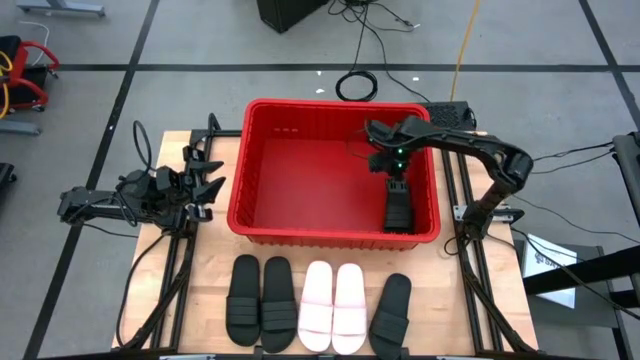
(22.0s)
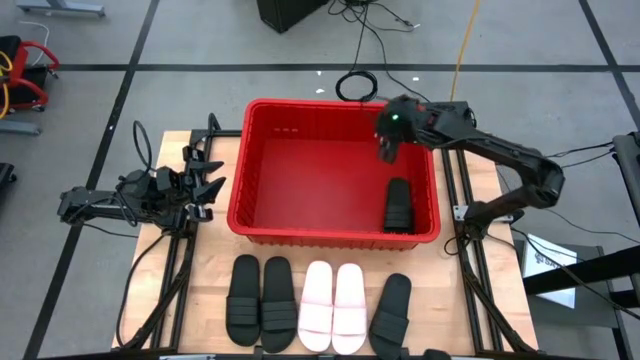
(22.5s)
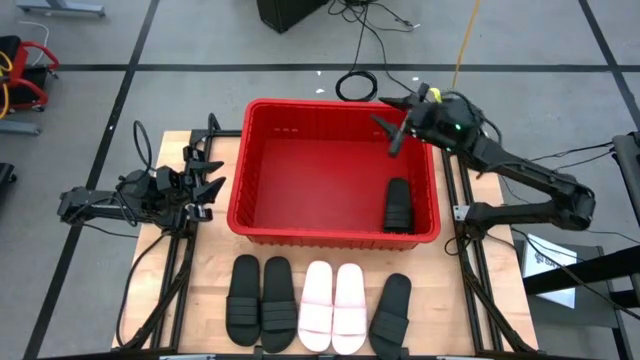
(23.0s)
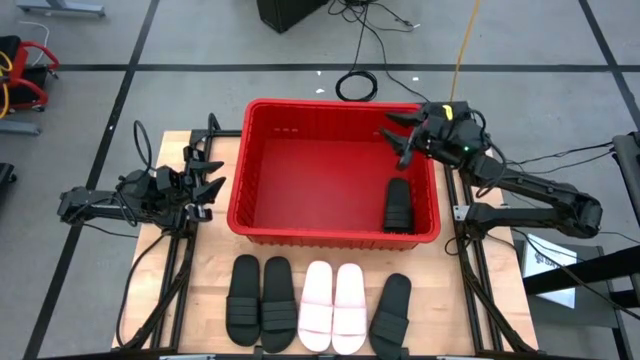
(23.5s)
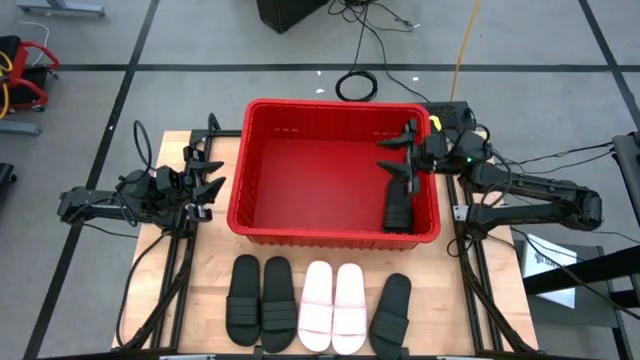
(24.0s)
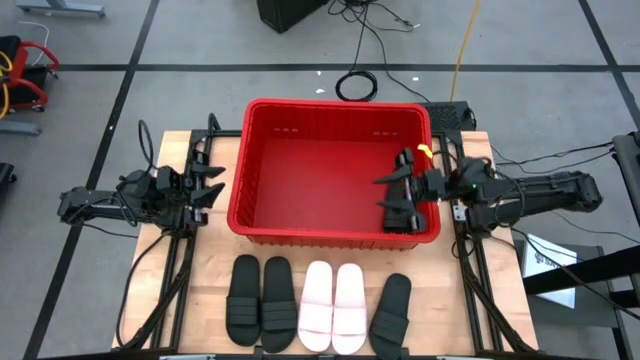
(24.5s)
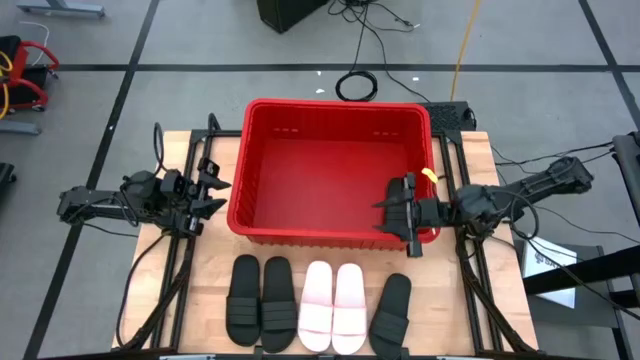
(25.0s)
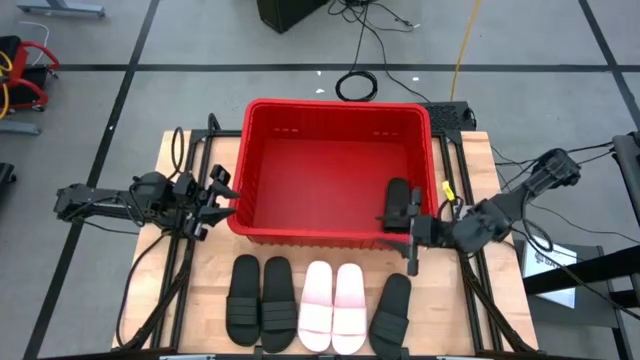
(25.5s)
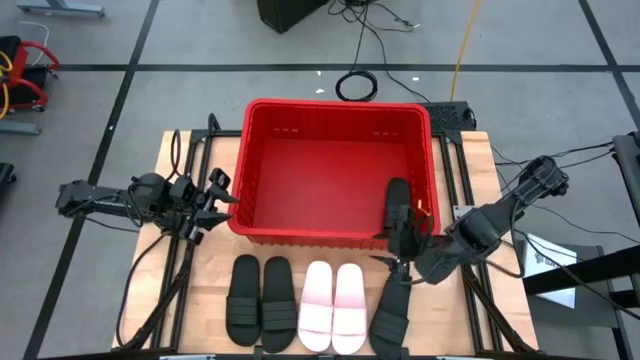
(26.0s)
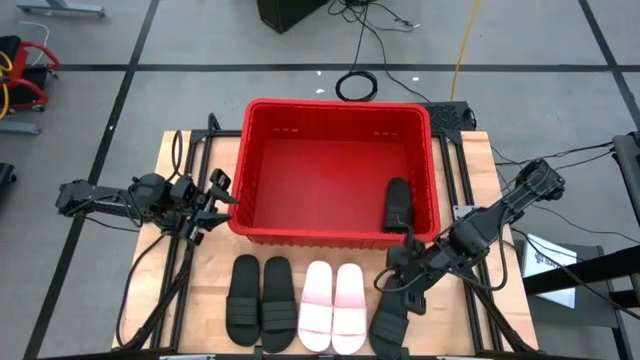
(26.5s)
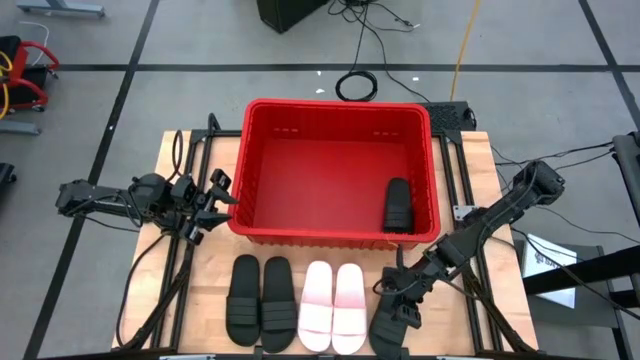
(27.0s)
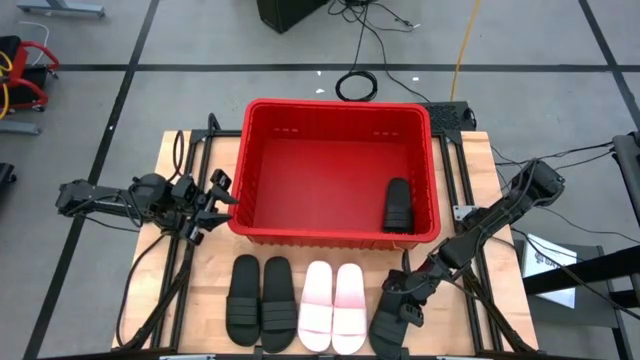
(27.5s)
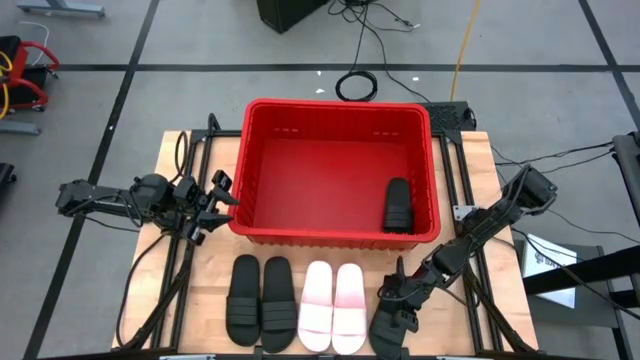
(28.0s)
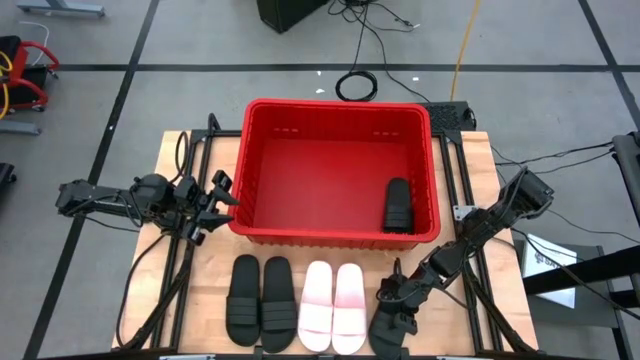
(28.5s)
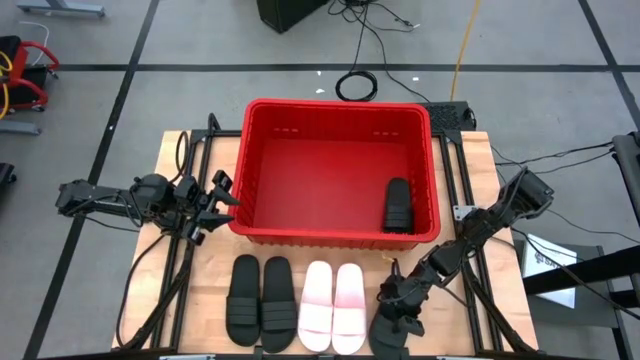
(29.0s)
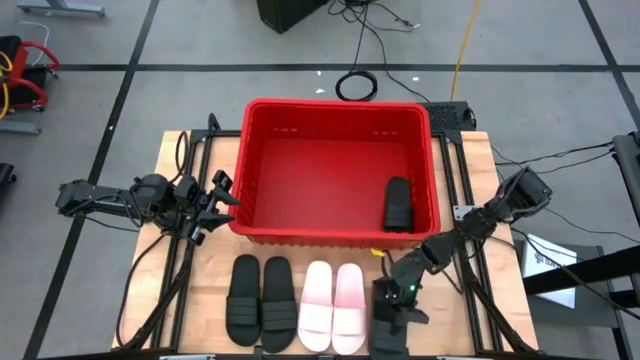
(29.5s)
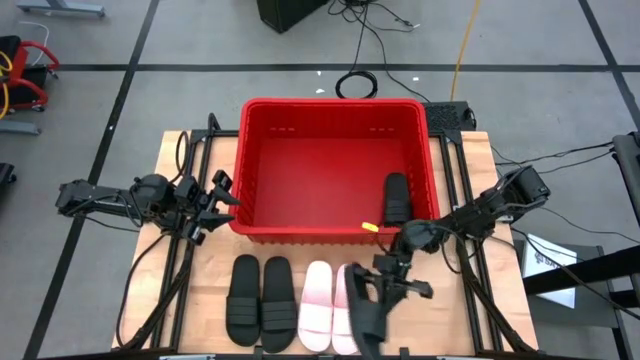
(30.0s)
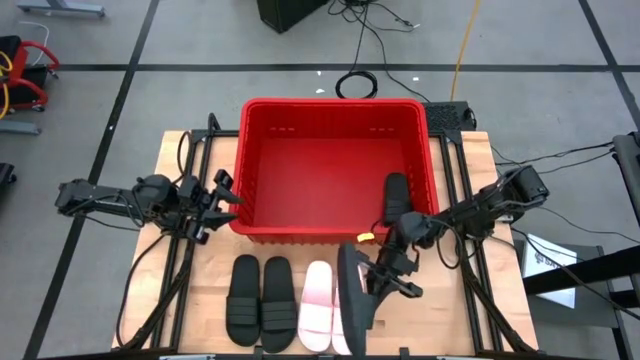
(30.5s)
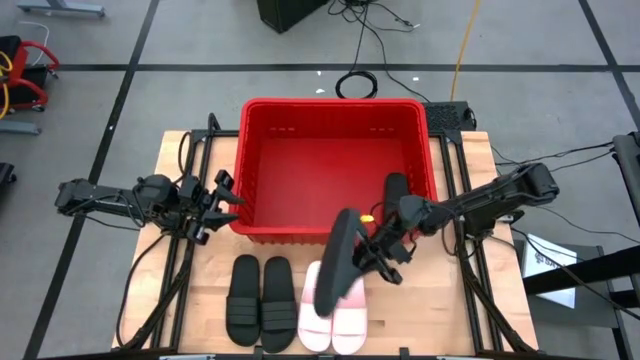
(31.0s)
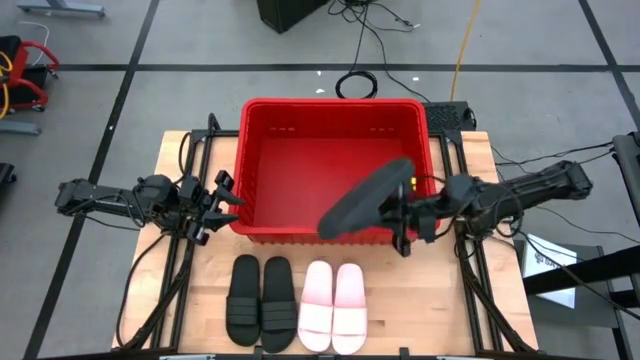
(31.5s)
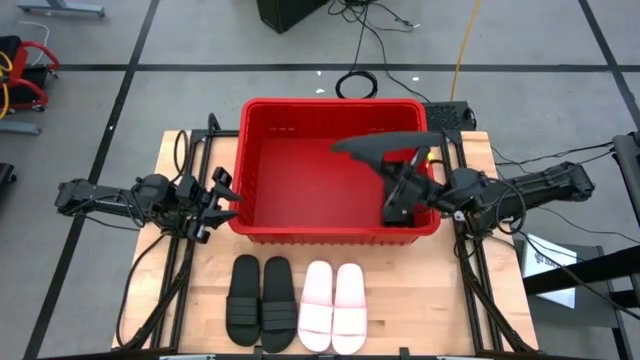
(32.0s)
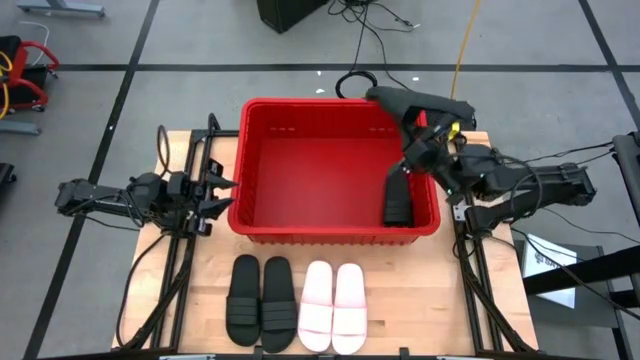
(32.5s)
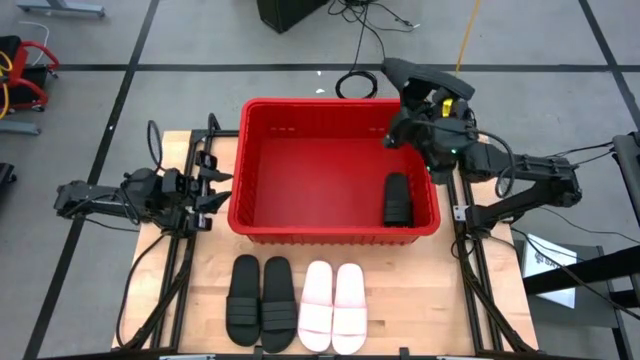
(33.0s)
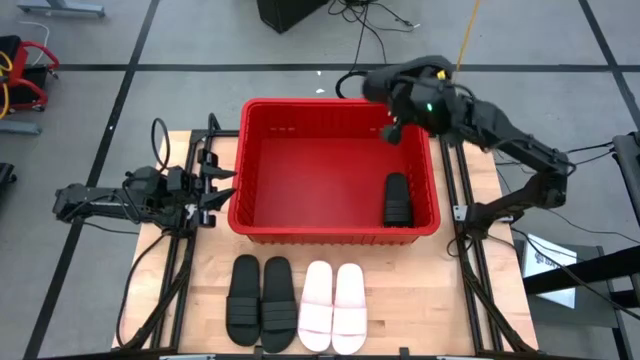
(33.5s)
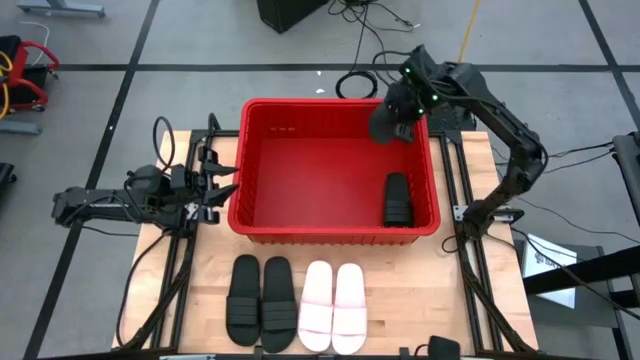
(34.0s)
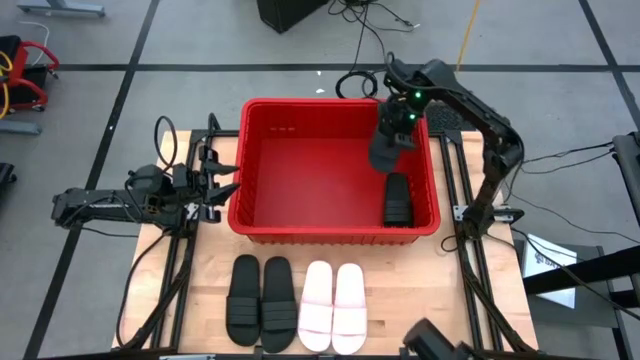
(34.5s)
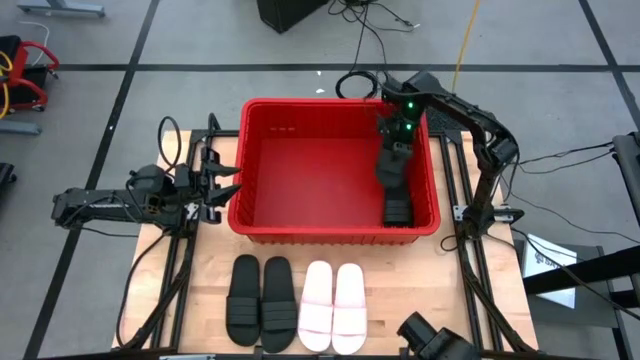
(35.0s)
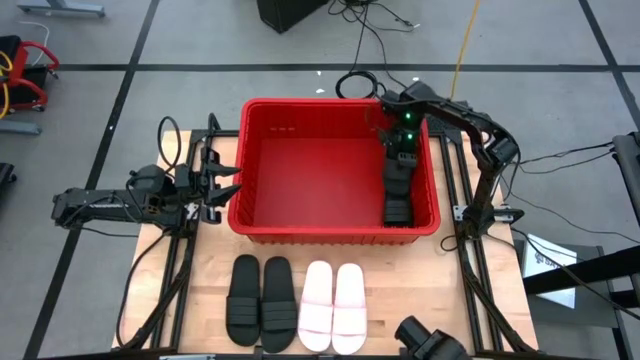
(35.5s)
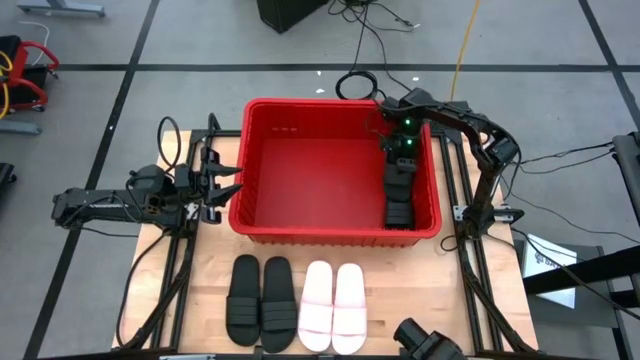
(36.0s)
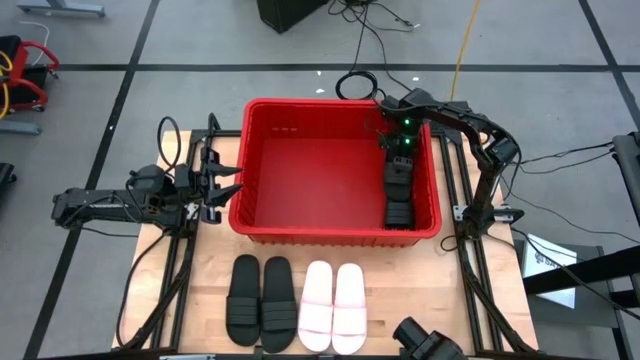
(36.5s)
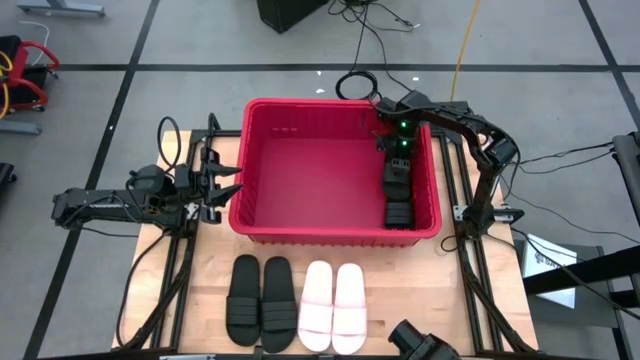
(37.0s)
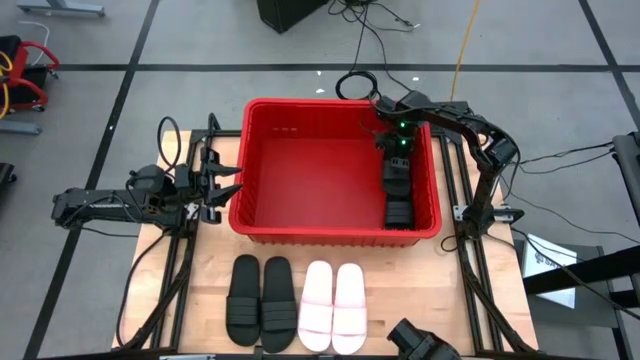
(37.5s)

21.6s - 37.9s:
Task: Pick and place slides into bin
Put the right black slide into the red bin
